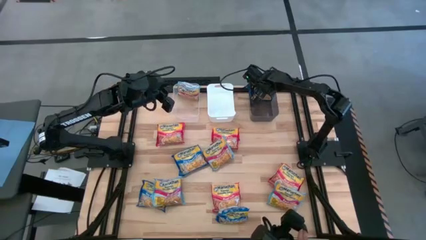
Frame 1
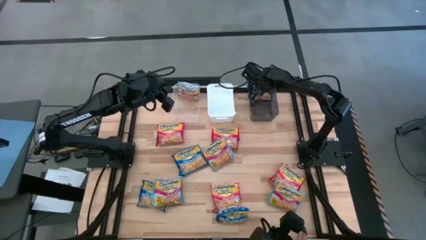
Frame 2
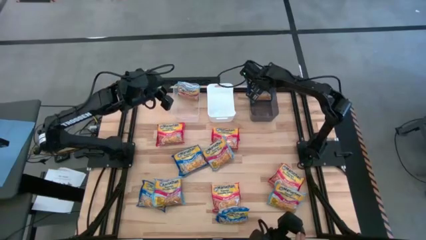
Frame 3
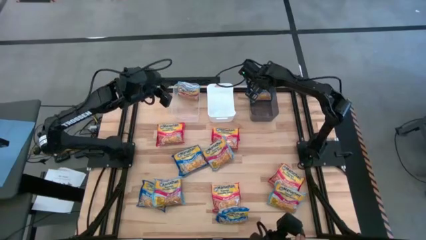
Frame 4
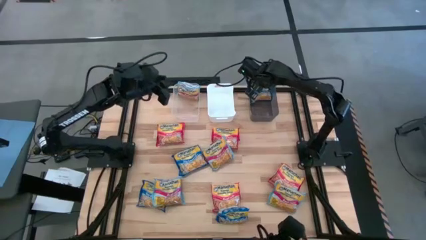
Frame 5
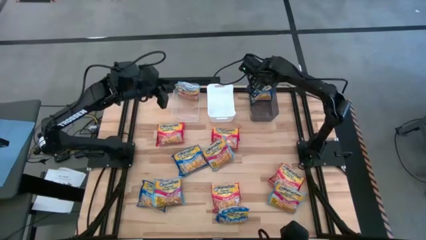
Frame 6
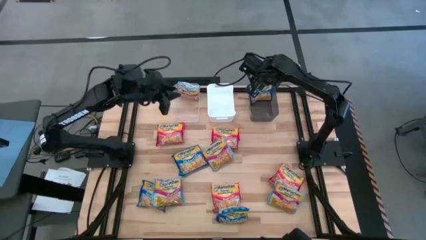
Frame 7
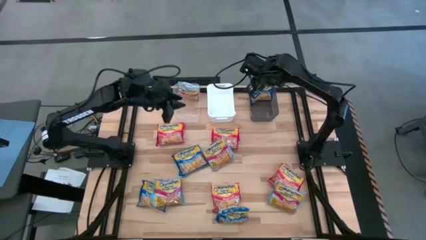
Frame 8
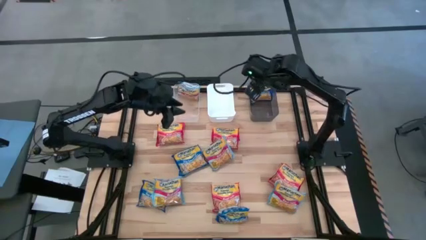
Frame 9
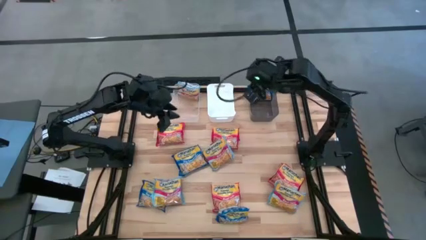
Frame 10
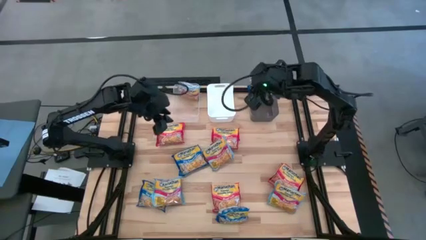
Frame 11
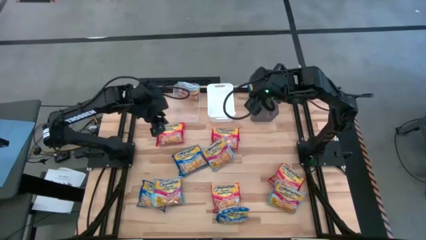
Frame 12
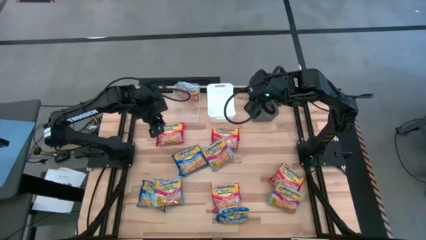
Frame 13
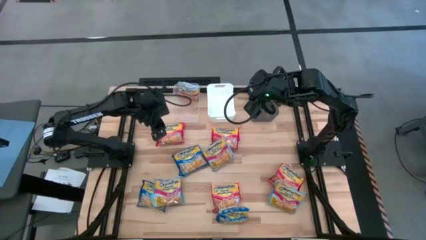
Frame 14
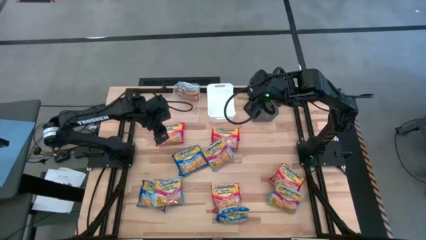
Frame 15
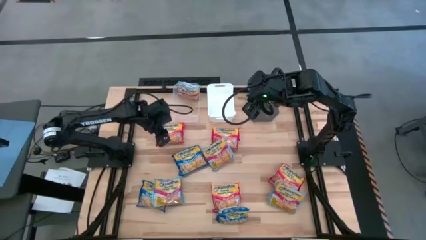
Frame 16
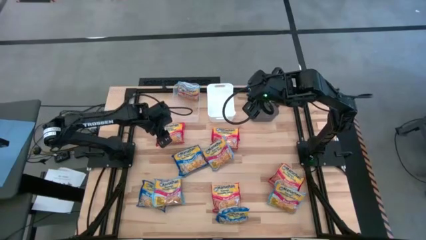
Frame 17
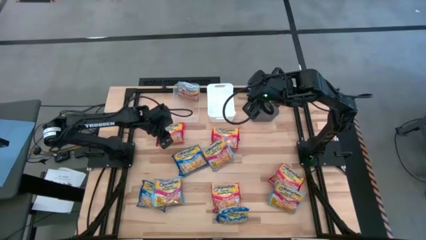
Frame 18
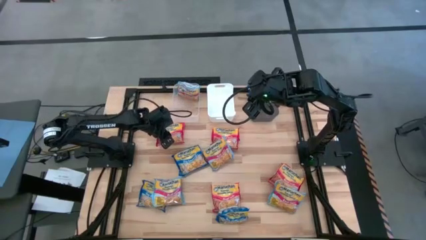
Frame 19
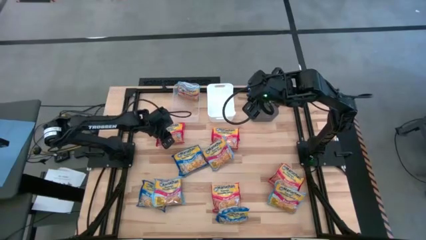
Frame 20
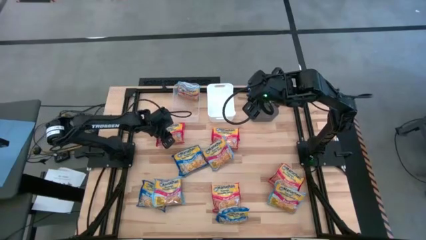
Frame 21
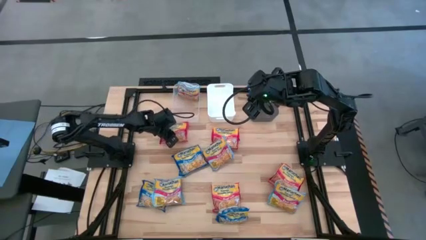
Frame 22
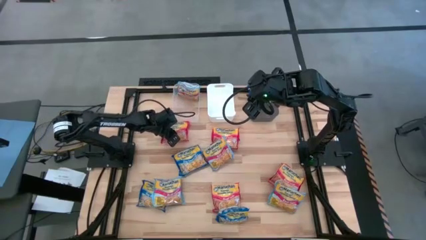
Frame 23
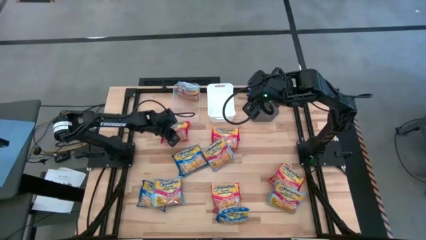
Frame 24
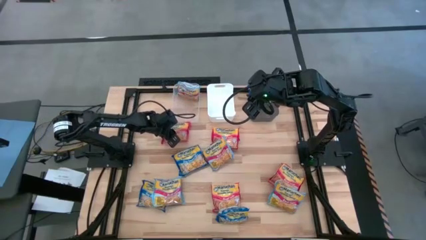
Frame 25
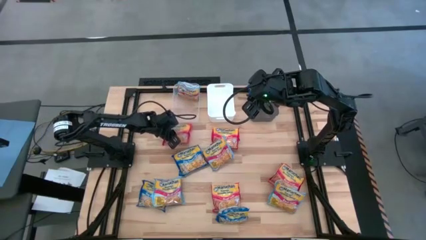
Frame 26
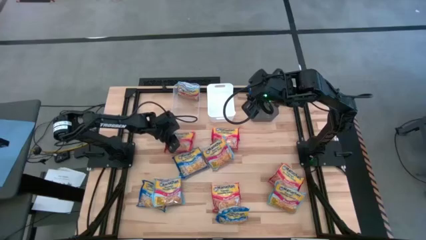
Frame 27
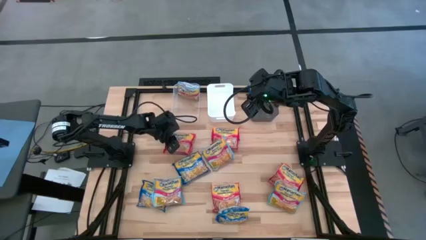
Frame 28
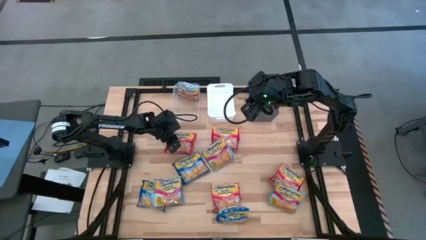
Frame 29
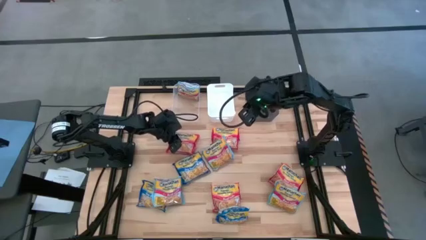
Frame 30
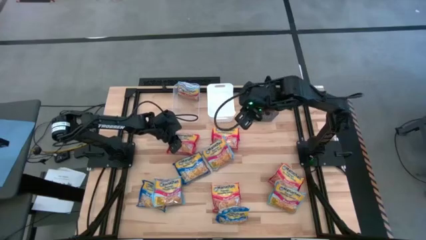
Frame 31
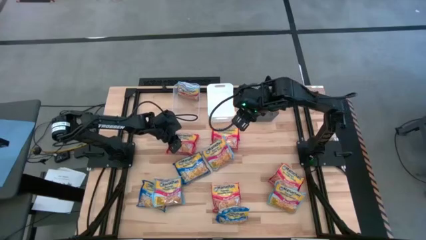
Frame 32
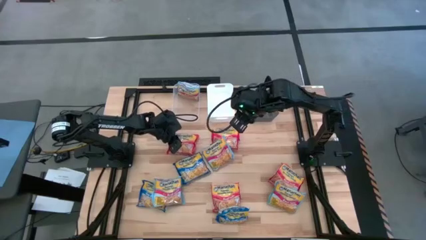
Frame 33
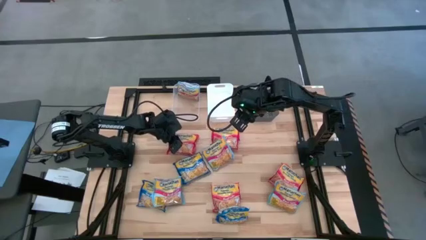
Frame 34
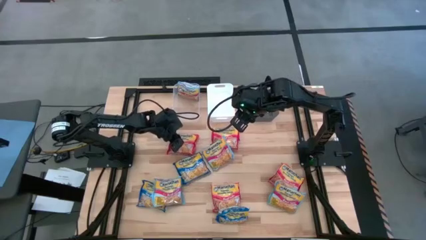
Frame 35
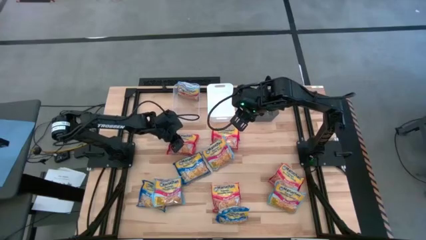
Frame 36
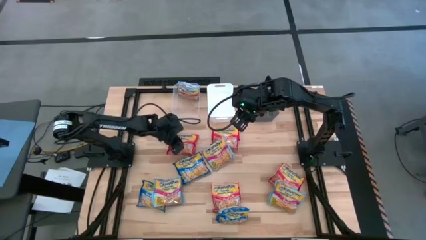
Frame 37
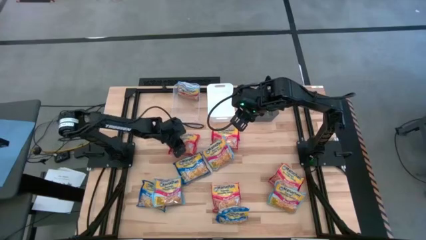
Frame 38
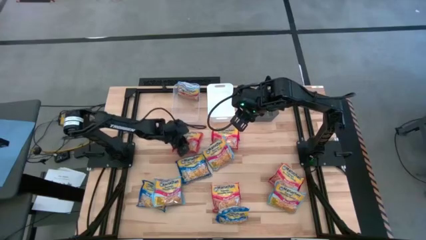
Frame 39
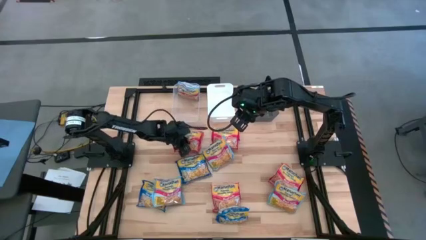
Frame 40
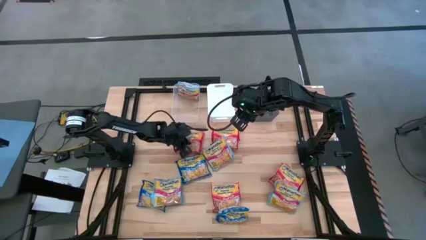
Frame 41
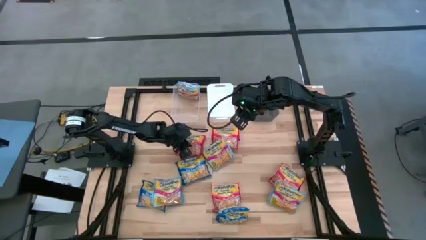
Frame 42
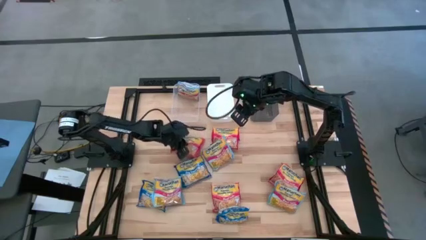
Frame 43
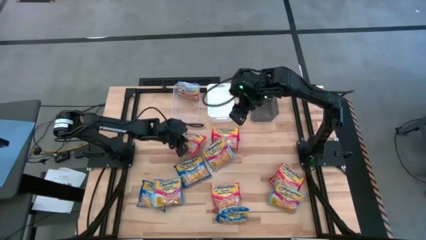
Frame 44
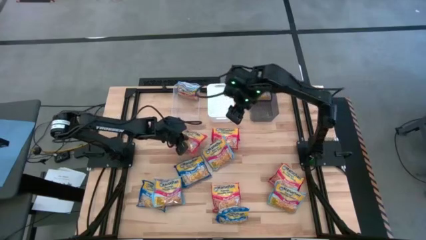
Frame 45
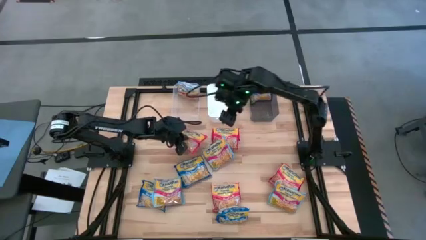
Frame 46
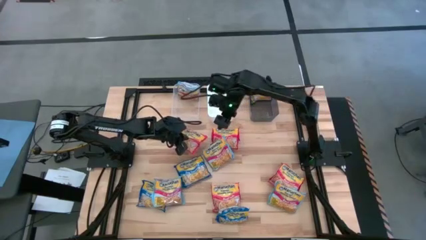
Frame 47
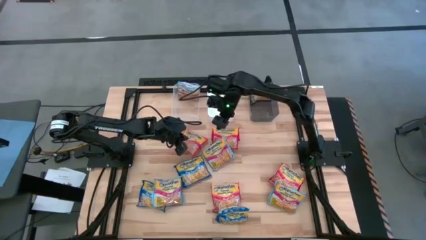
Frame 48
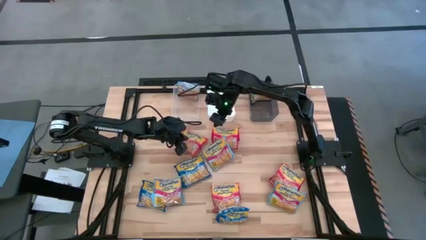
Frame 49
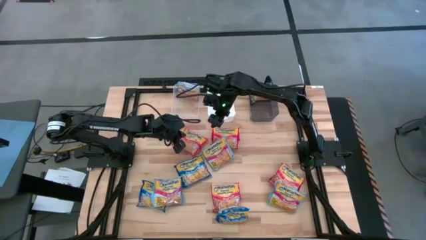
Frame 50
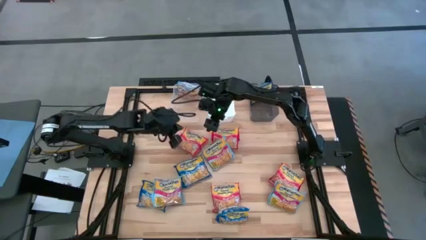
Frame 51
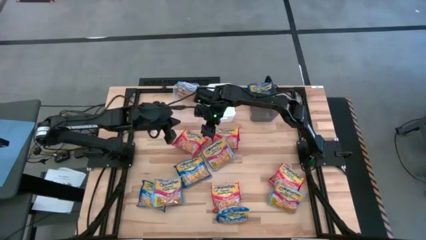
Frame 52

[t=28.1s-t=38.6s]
Task: Sort Maruchan noodles
Put the orange bag into the white bin
